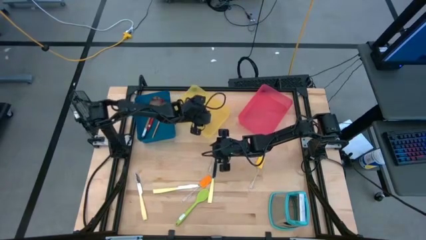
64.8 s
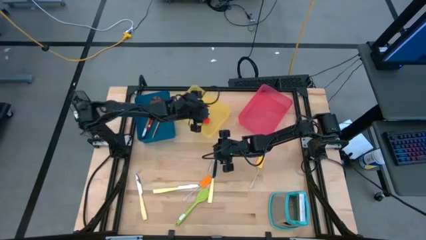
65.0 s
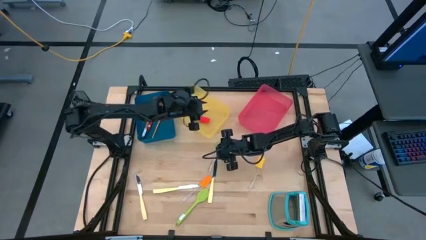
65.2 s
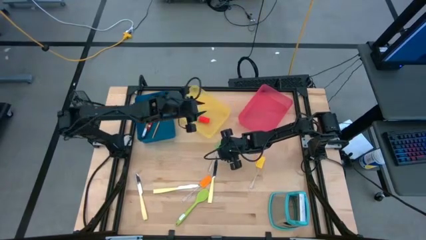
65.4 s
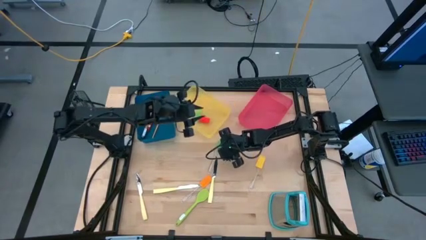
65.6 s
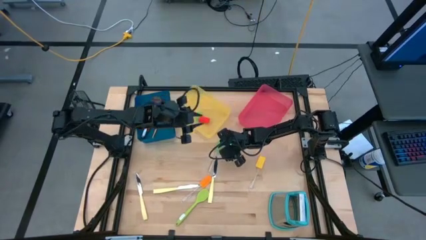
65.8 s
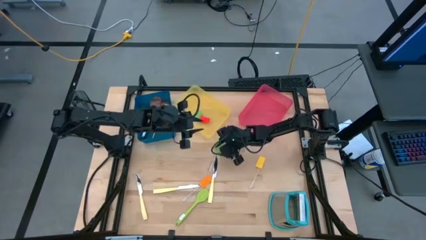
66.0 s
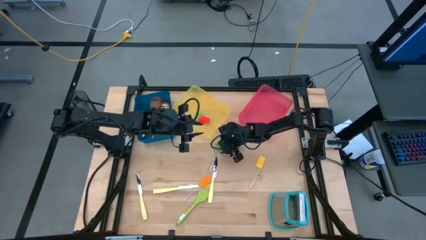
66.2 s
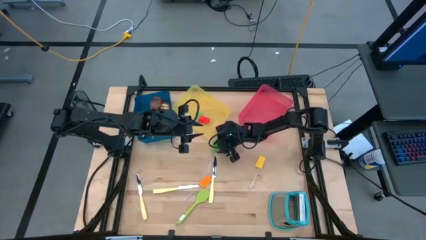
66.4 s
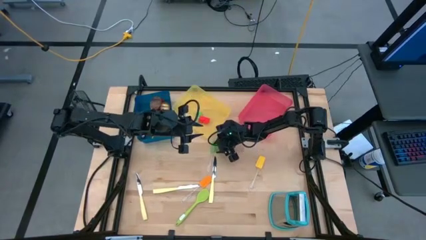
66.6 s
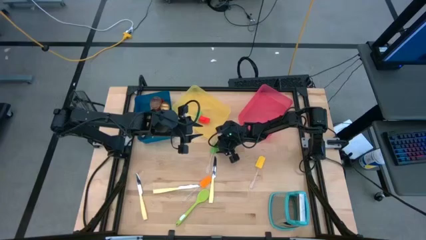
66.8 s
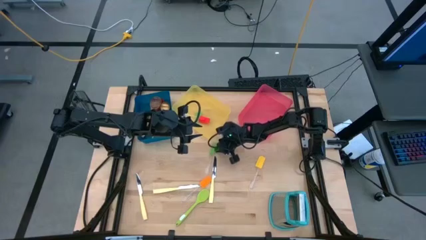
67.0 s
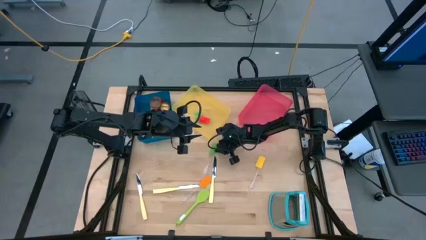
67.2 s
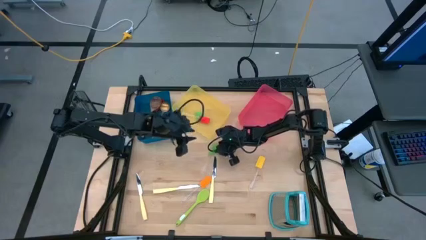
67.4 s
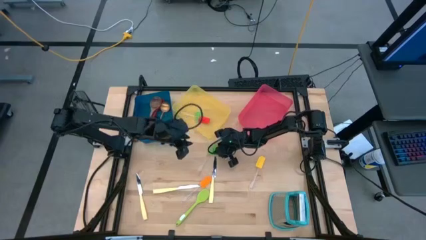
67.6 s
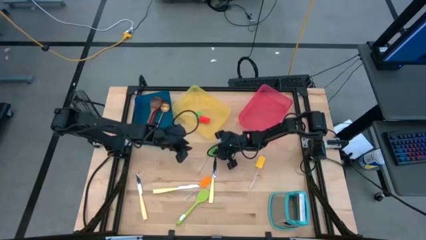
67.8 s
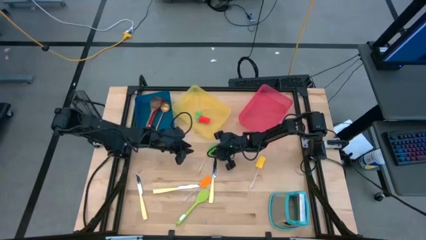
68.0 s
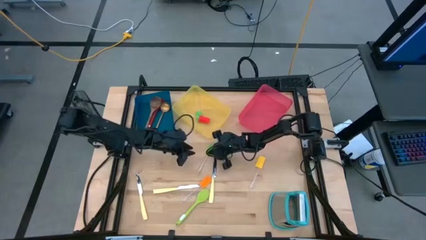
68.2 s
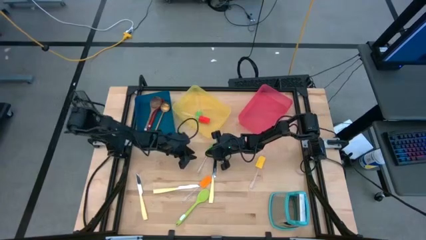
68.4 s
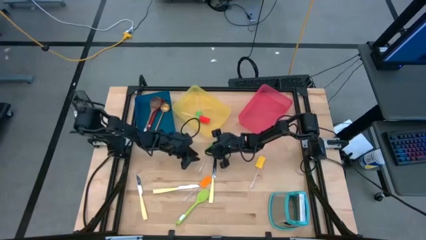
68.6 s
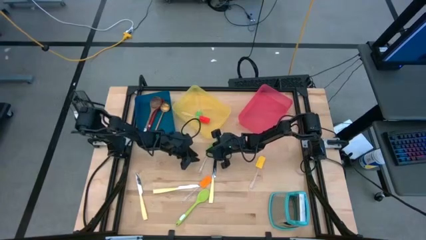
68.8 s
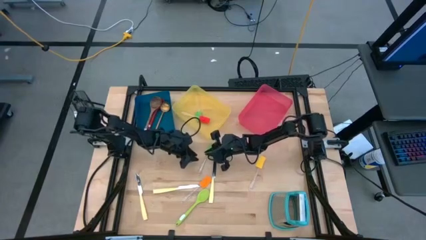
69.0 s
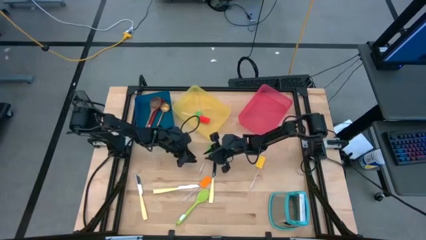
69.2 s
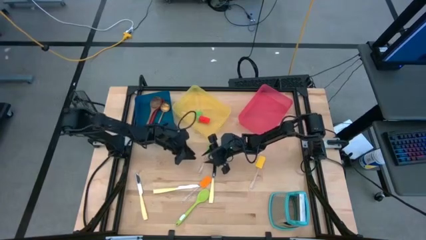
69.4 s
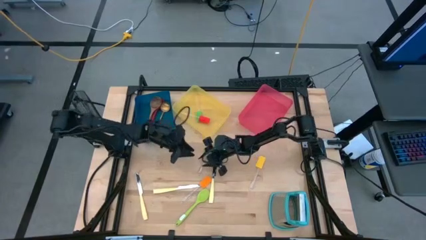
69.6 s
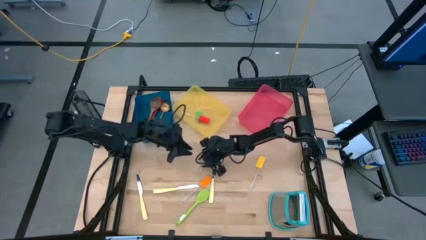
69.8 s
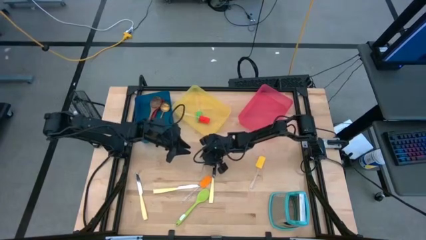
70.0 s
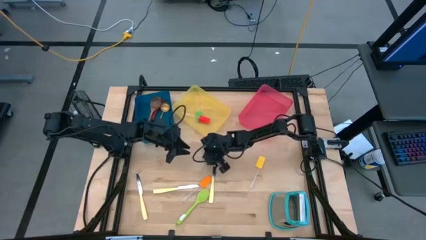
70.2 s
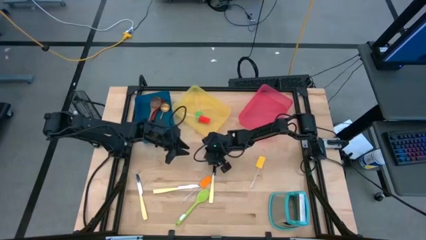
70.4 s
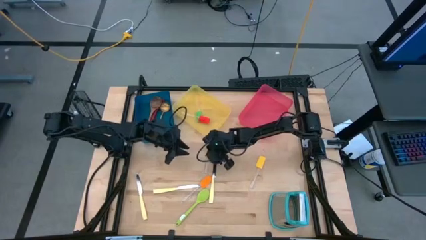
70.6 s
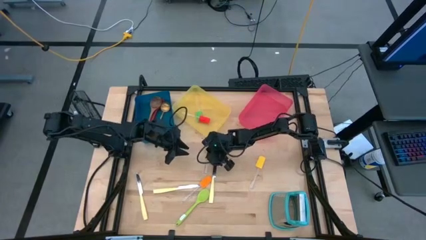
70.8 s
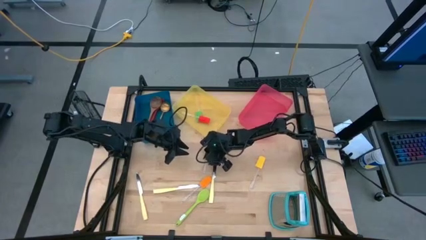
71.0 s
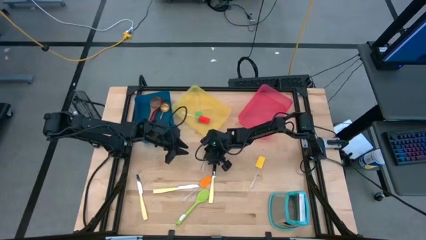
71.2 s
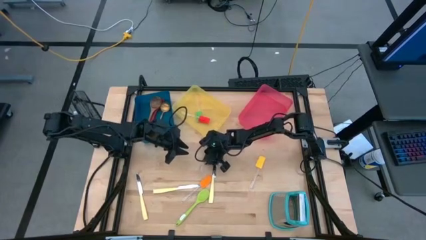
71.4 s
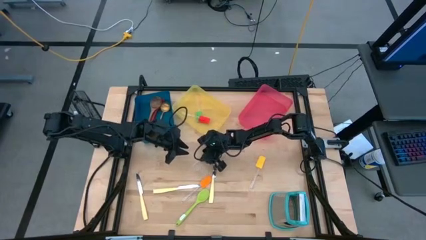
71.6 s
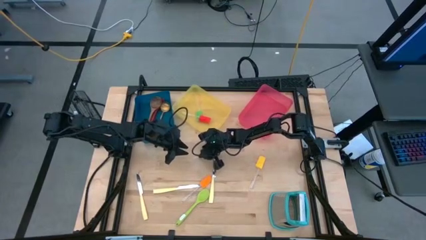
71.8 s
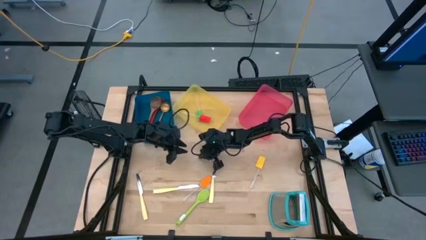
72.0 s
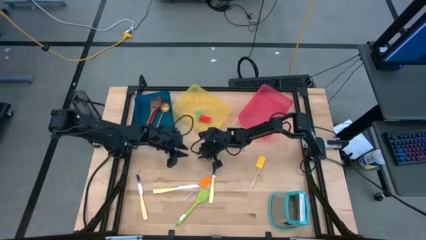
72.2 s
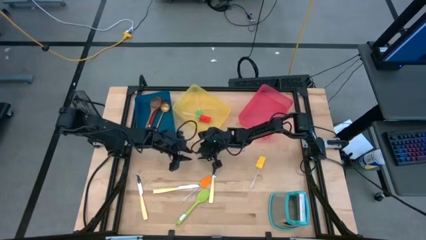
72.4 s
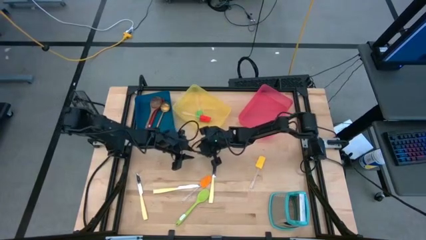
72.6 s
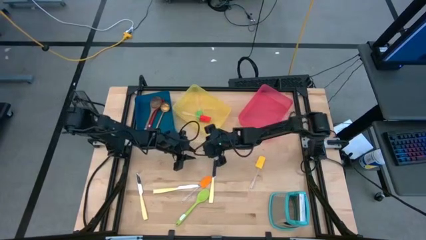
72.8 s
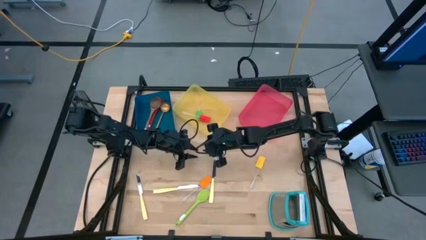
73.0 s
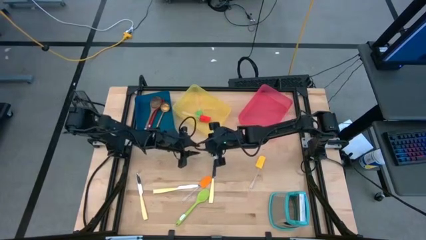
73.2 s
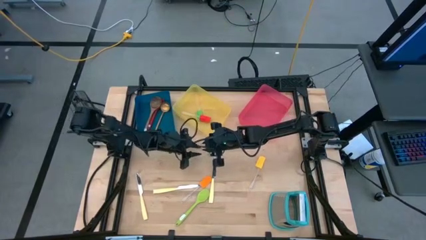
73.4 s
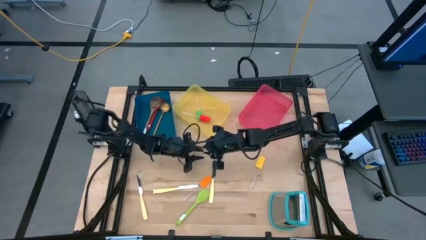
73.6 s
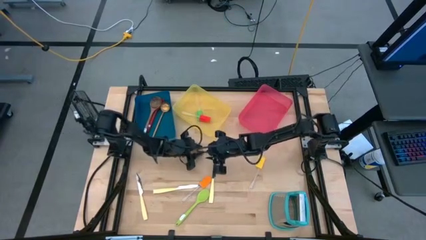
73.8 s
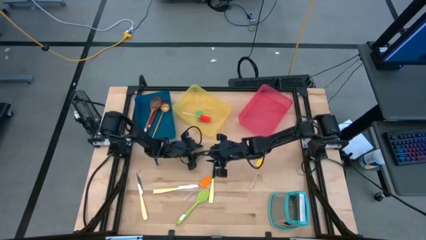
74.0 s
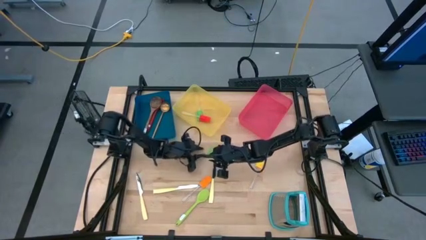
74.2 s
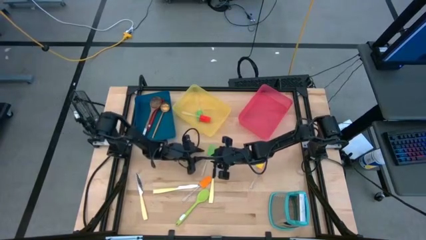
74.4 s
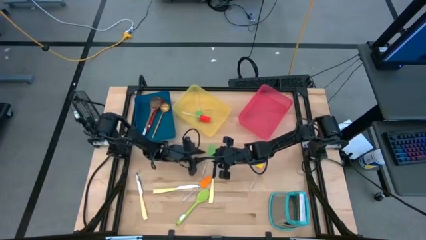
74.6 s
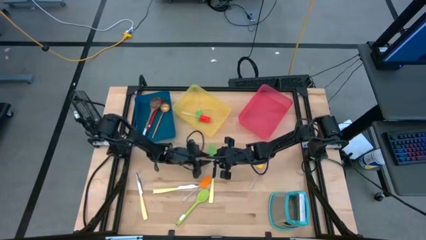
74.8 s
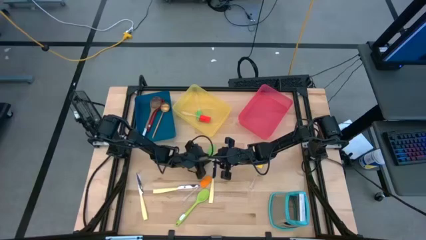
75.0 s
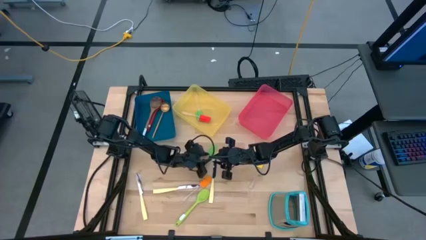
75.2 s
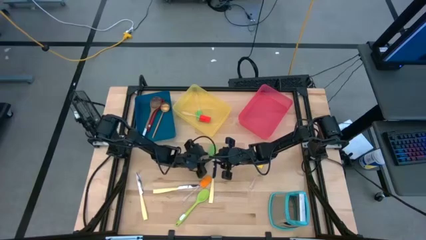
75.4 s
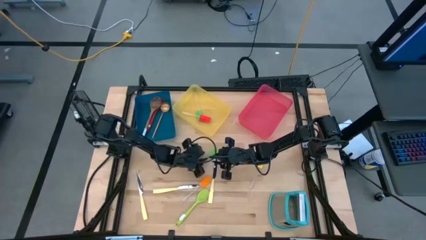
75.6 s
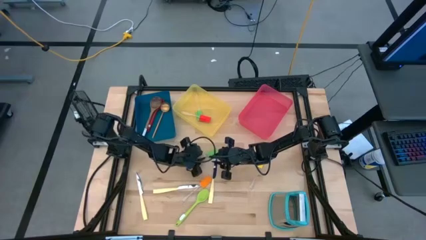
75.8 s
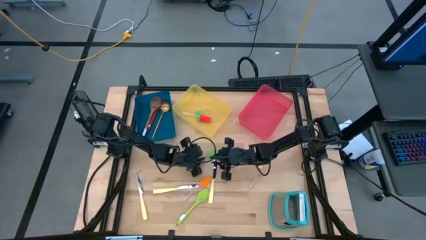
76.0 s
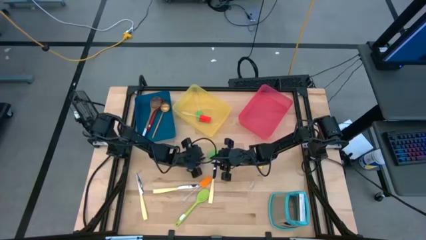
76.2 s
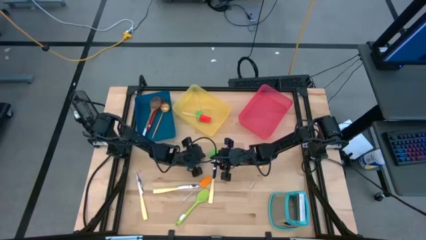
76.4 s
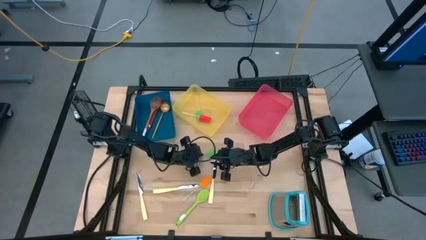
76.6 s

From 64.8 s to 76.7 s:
Task: Pick & Place Kitchen Items
Put the green spatula into the yellow bin

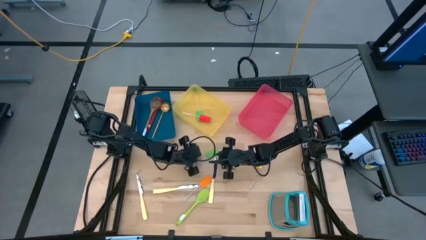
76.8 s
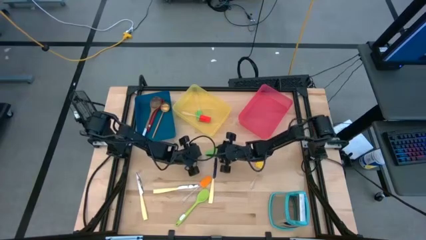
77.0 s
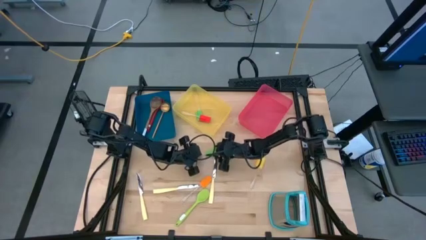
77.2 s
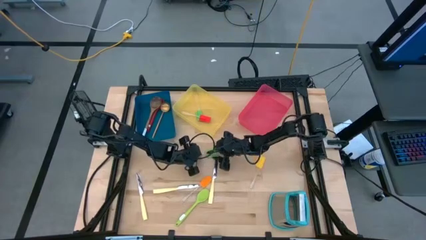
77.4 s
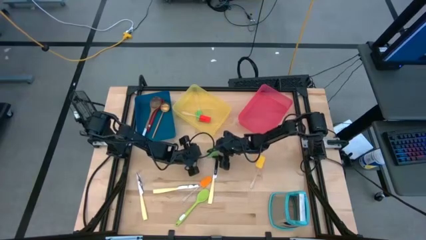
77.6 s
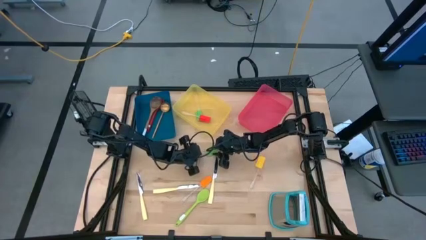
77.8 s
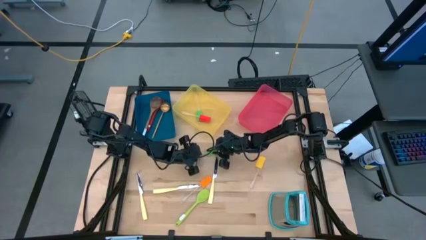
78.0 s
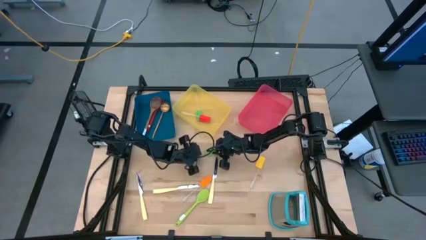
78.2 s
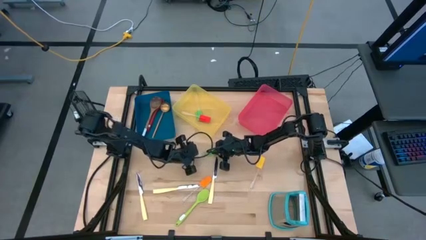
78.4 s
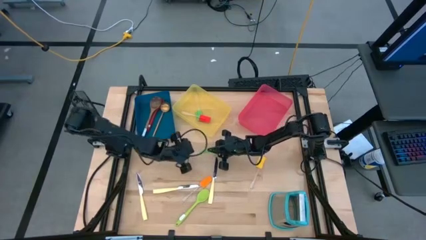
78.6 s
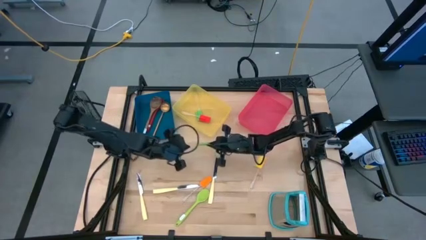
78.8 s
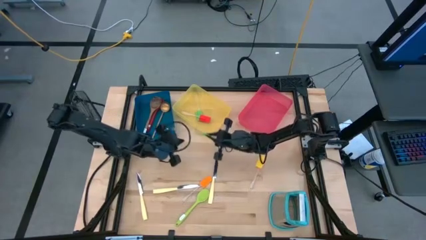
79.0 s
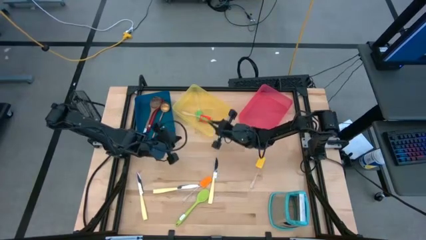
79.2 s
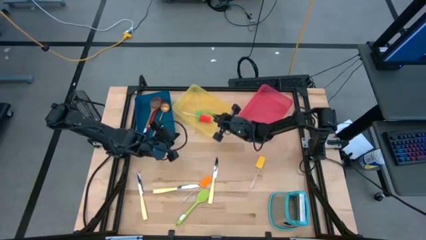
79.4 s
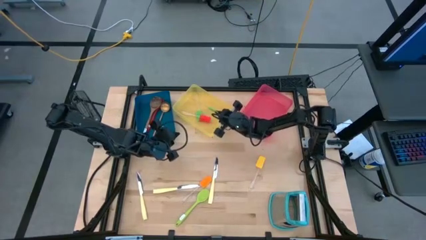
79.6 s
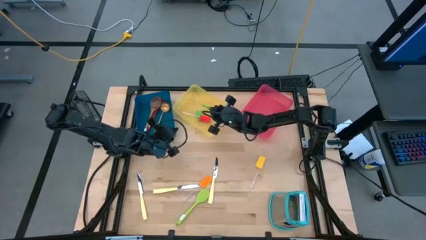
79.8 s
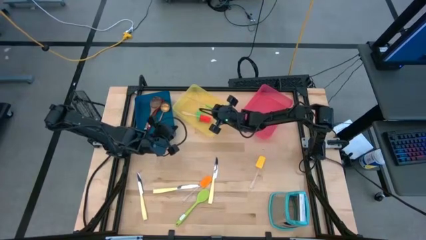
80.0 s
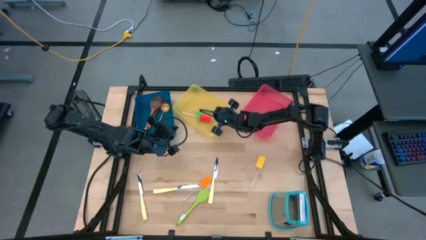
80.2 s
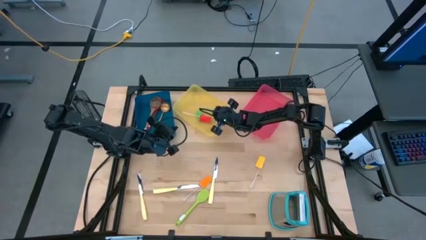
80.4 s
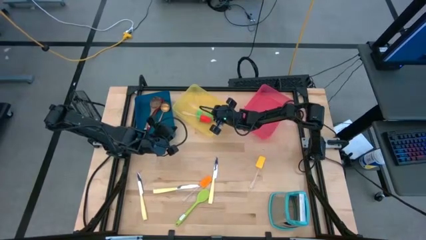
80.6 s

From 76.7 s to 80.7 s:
Put the green spatula into the yellow bin
